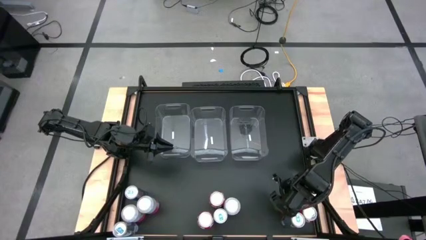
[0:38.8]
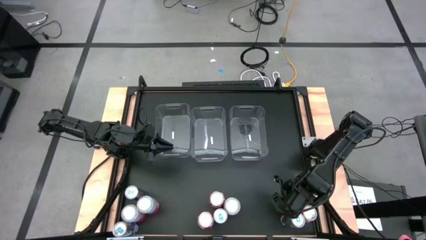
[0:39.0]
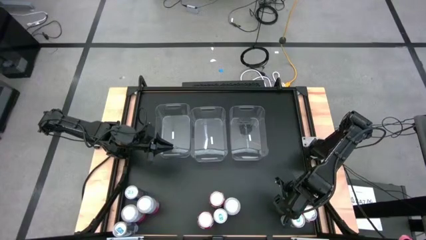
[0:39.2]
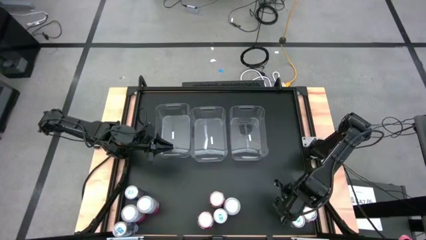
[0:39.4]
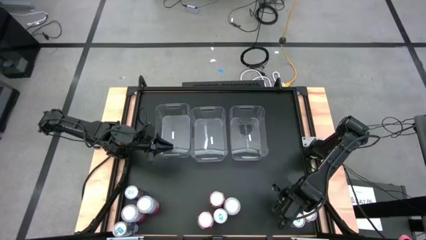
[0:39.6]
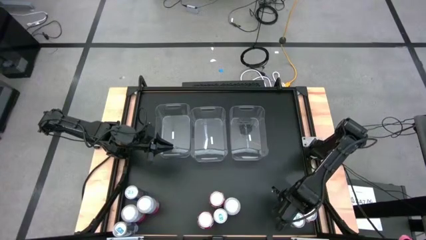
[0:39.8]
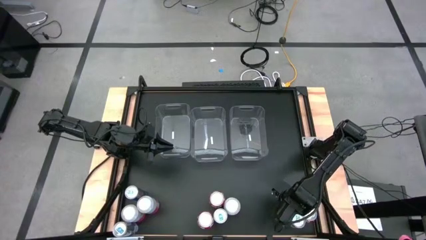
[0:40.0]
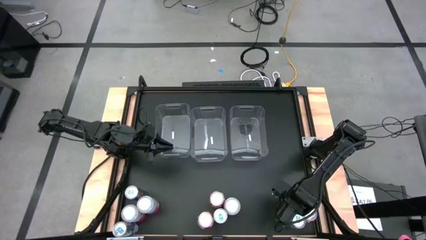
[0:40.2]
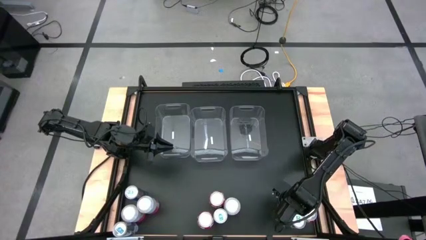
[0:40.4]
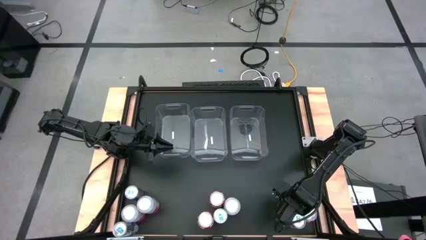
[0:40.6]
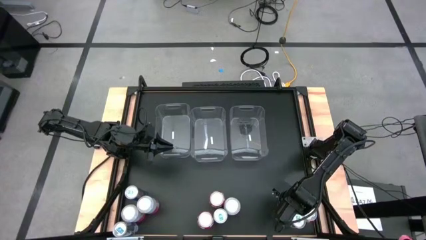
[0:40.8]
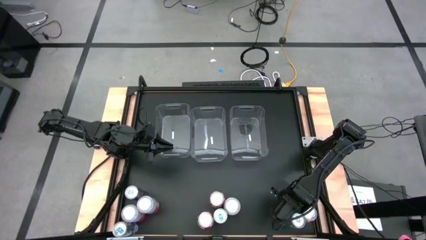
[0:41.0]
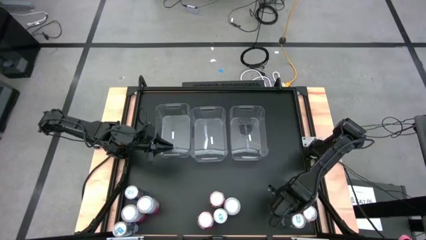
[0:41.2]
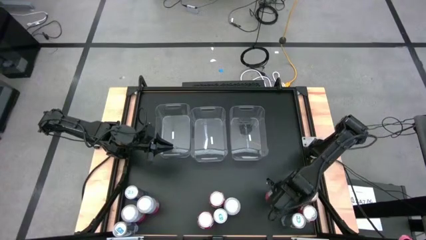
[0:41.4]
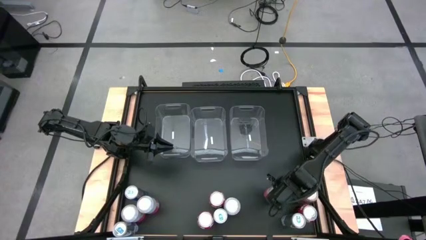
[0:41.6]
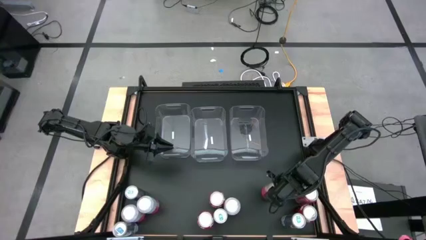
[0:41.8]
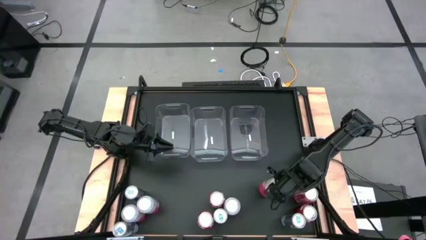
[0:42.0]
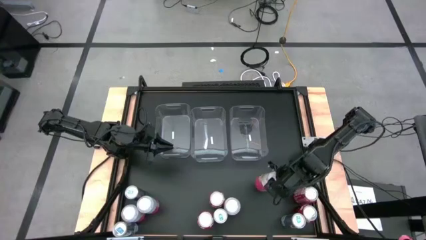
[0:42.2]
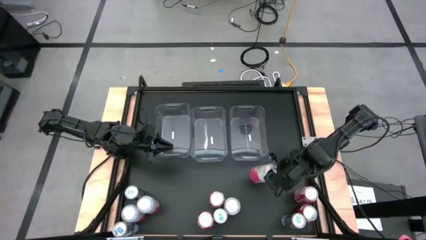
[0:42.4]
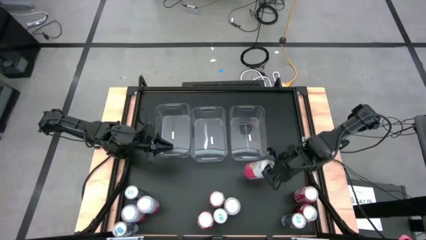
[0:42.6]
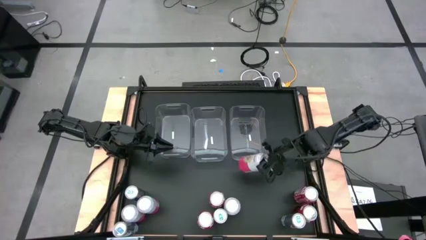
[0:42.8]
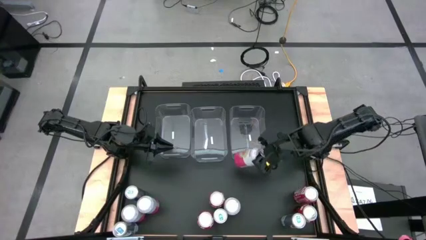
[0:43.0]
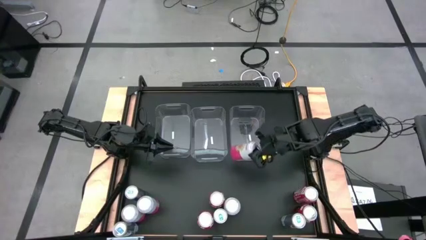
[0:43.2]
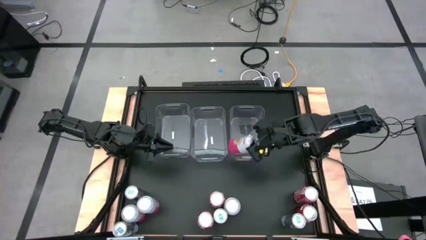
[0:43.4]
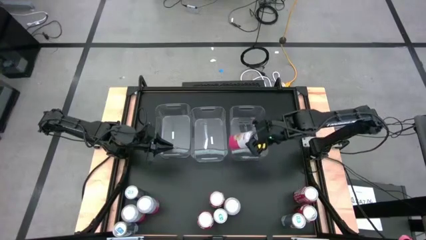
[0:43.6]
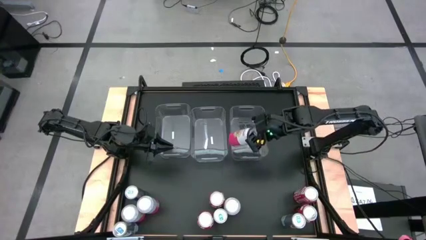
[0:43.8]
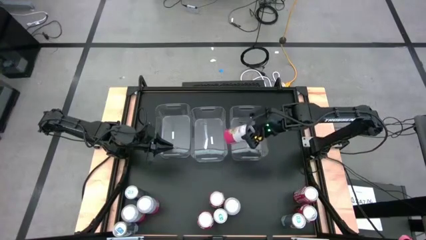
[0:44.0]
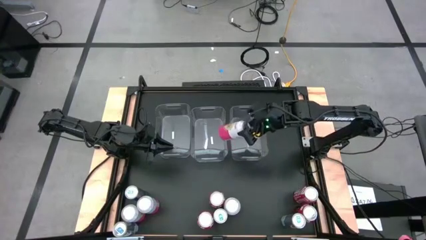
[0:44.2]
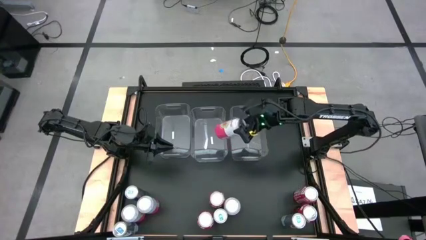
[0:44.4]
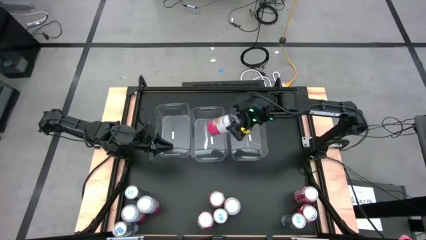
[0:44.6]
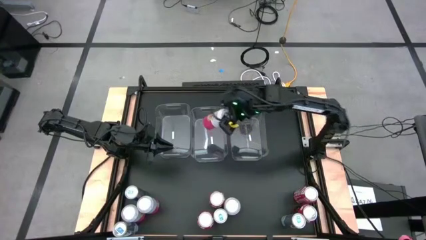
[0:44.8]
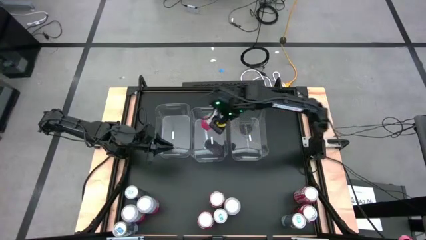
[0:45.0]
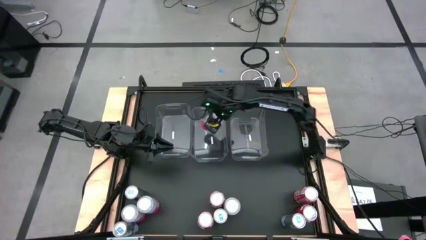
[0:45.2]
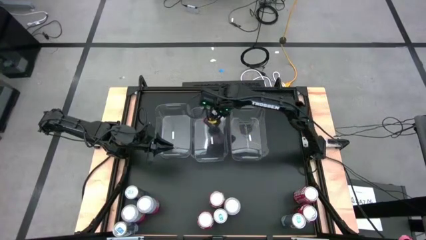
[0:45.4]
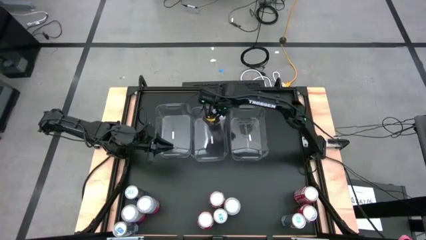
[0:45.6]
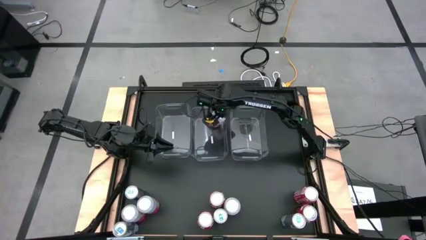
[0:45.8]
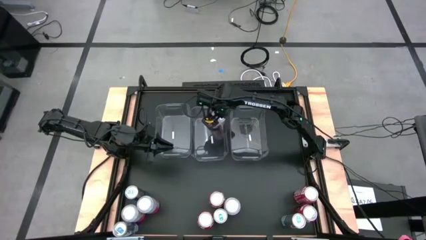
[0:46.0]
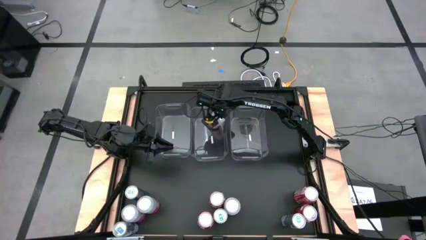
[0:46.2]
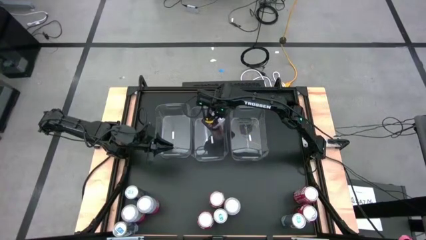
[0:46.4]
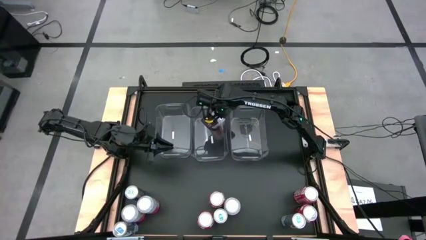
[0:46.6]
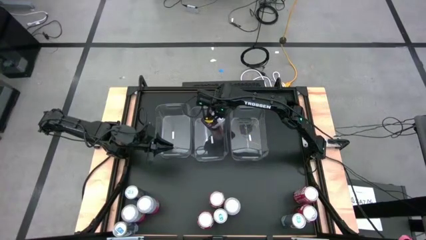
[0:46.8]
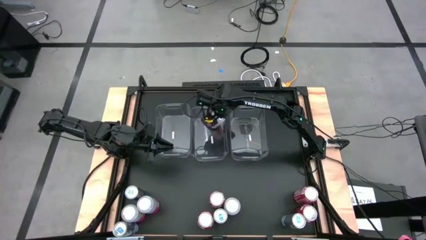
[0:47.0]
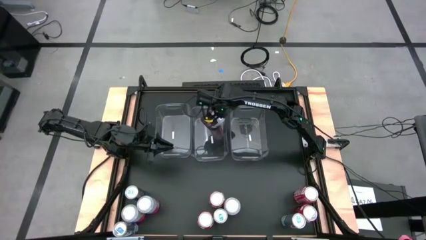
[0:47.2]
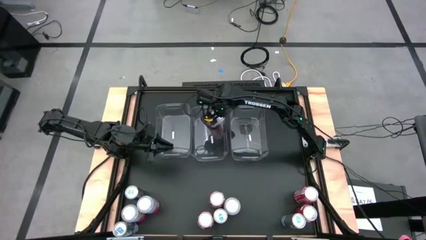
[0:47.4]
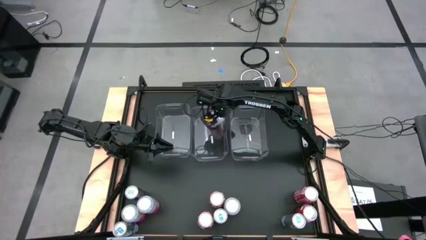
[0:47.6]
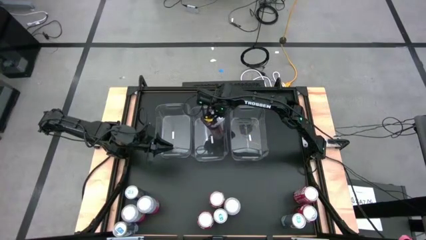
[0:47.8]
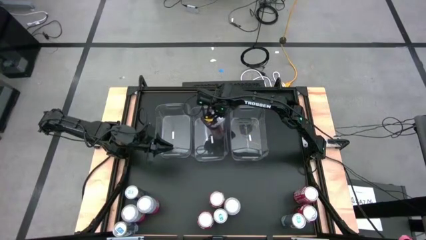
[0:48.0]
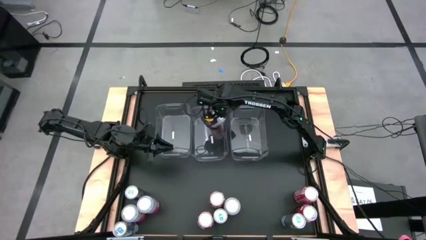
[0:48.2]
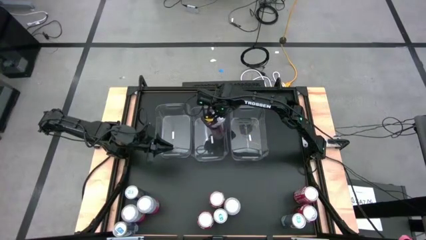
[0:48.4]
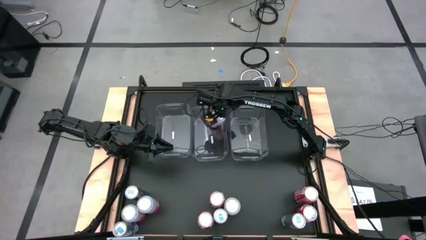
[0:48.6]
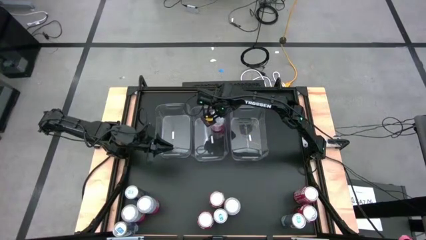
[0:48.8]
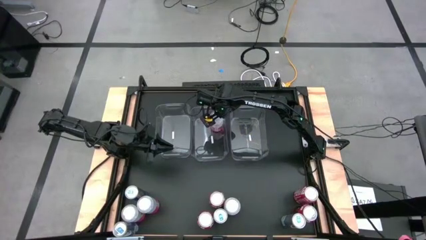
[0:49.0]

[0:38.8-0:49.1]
Task: Sort soda cans
Put the pink-white soda can into the middle transparent bin

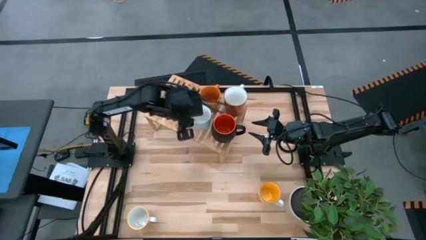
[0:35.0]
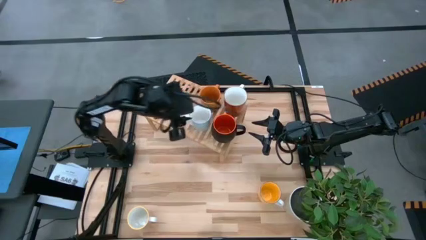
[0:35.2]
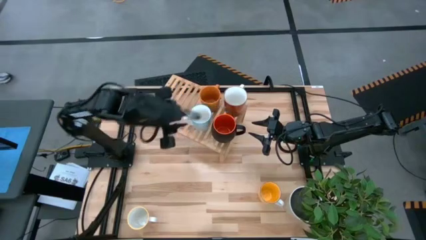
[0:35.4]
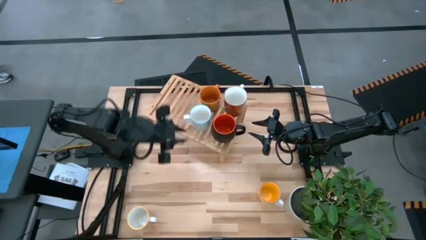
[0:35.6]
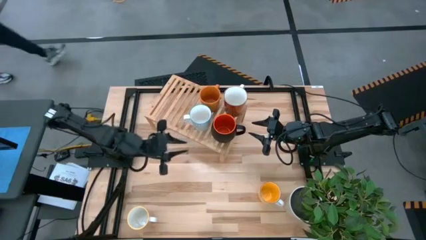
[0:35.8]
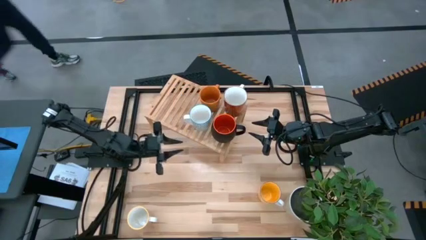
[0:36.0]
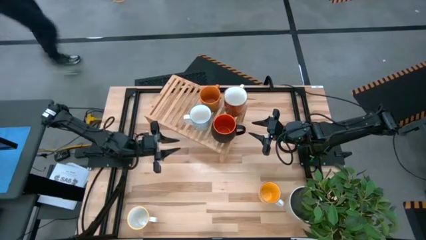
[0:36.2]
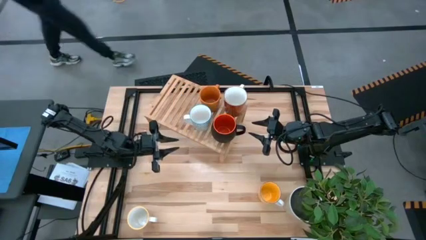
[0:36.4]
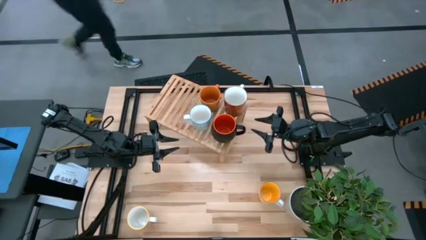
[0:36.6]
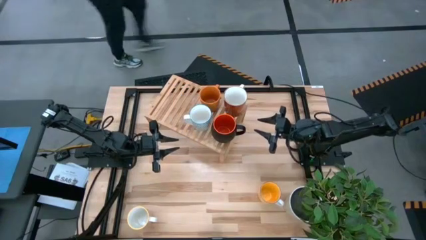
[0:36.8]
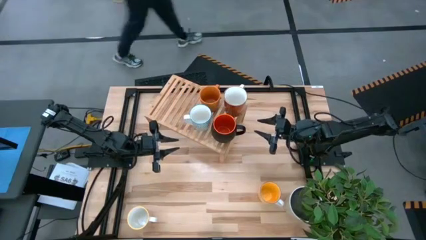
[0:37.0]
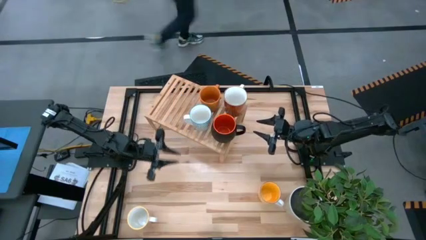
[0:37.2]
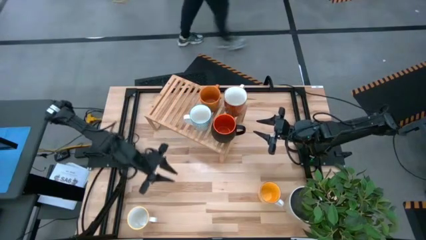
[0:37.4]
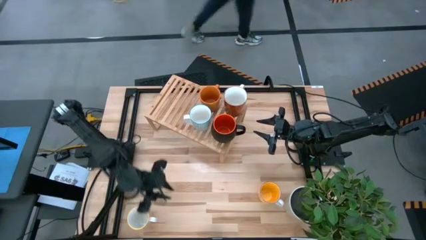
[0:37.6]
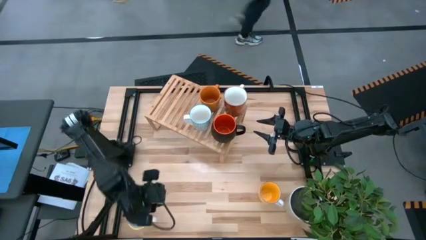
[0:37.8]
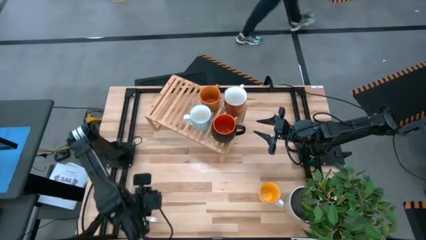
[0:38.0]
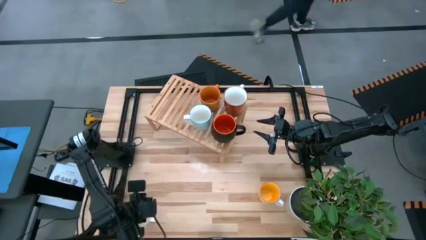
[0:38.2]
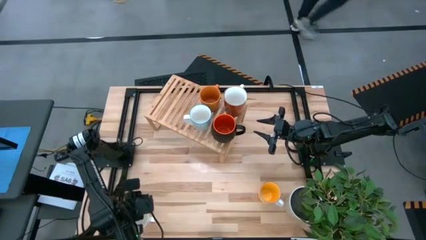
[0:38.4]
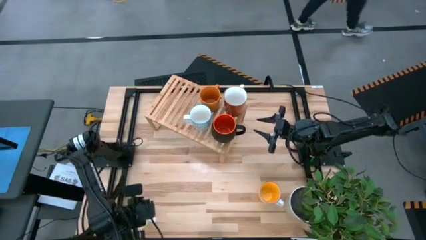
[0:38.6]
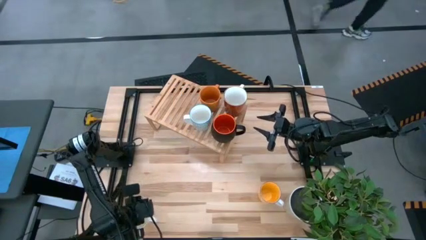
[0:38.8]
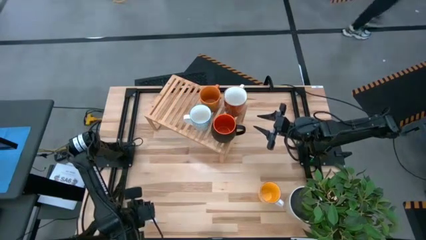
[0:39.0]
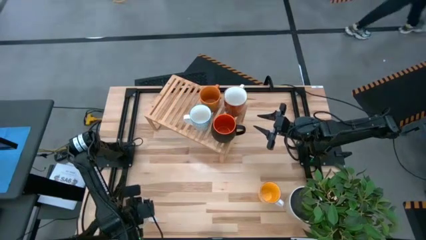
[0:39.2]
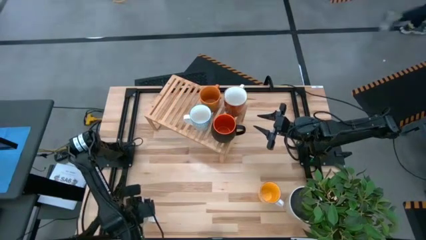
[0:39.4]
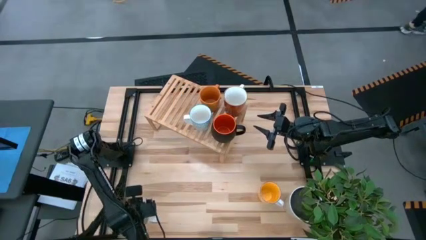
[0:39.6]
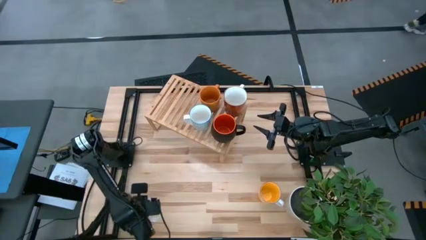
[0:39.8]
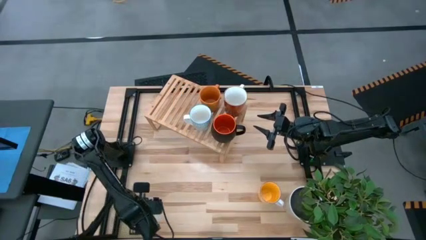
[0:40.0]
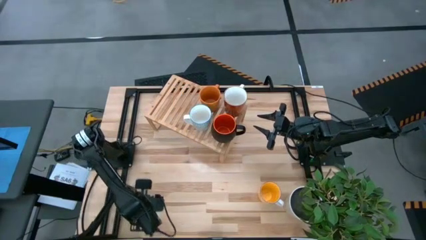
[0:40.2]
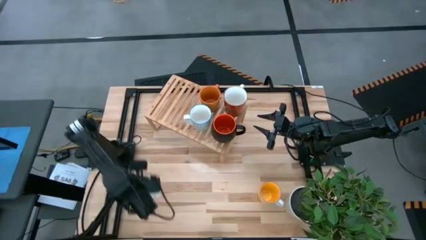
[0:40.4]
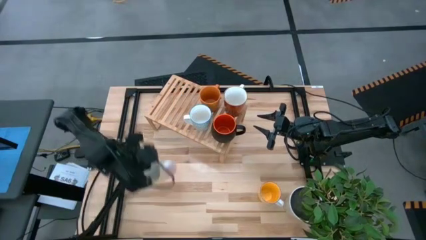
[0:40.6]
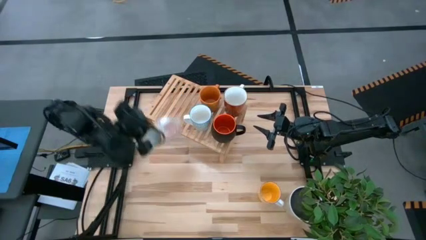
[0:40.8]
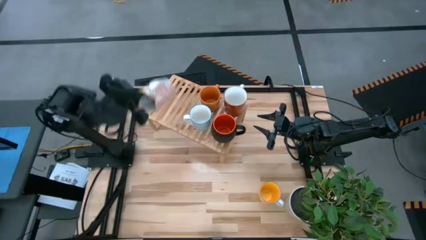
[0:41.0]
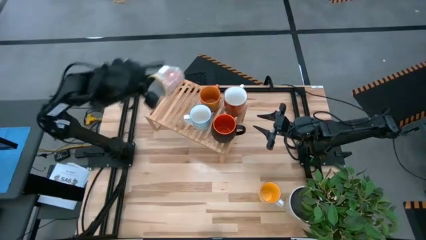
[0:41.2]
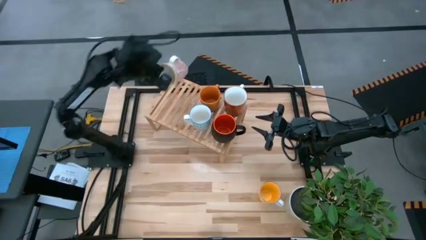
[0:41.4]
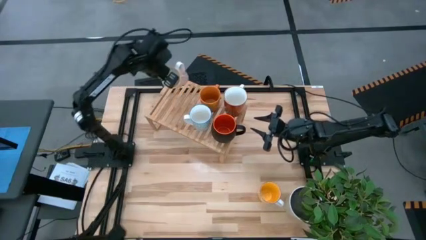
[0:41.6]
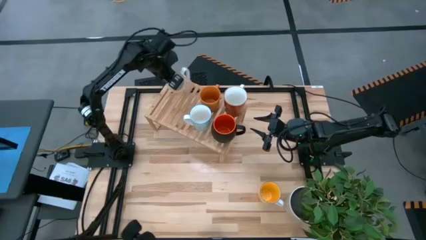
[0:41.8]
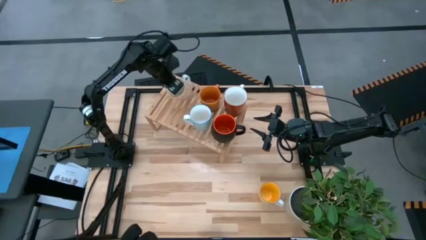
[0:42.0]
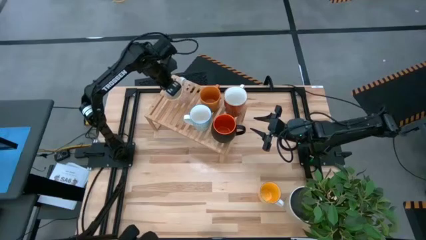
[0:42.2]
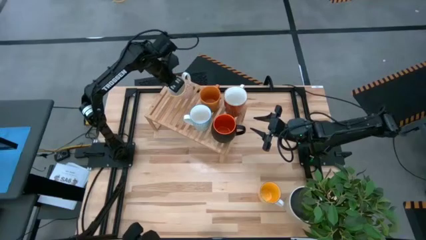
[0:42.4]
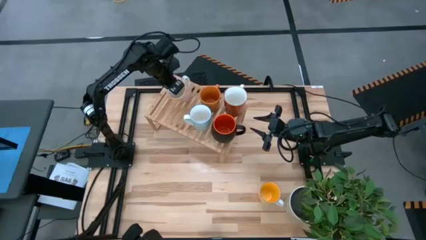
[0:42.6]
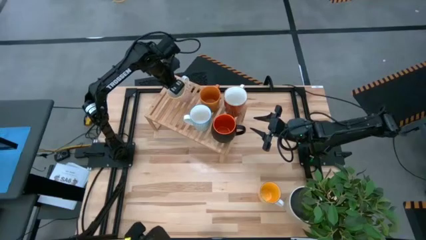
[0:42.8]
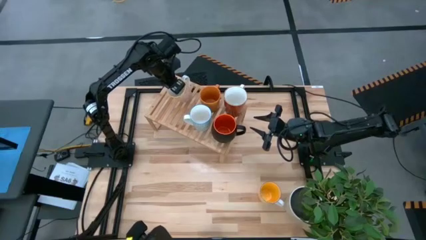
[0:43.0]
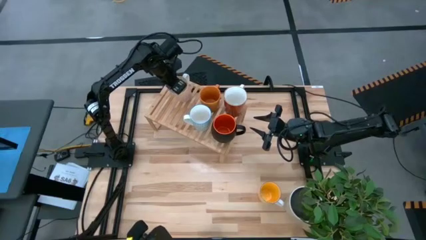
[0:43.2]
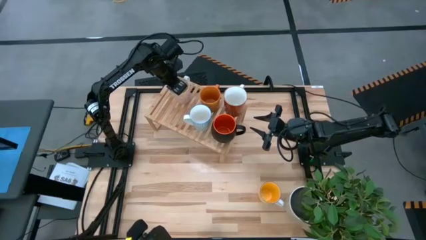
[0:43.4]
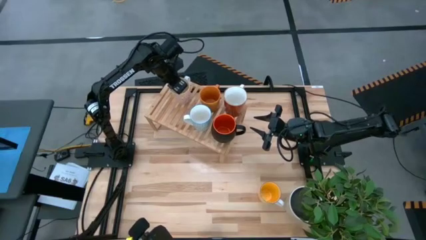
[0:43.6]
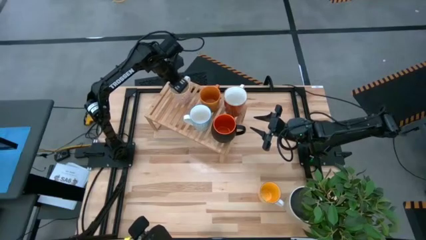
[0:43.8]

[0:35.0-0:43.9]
Task: Place coffee mugs
Put the yellow patterned mug on the shelf
